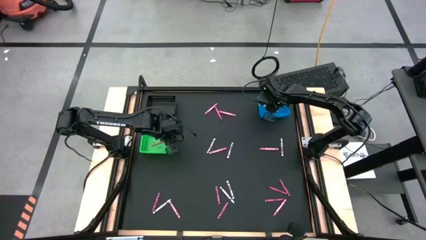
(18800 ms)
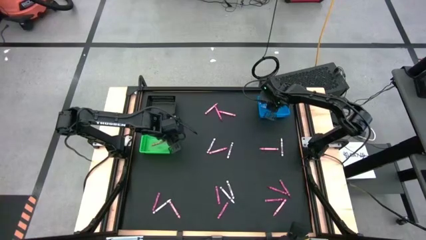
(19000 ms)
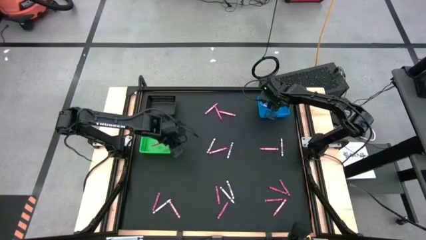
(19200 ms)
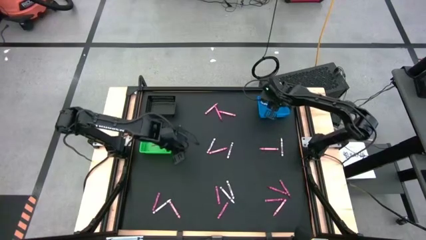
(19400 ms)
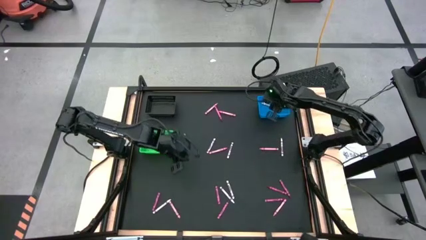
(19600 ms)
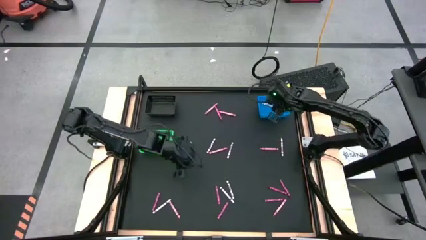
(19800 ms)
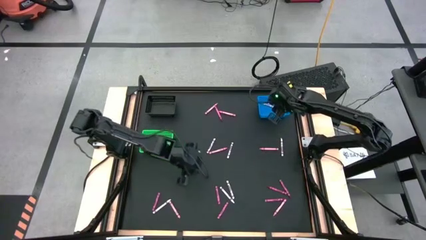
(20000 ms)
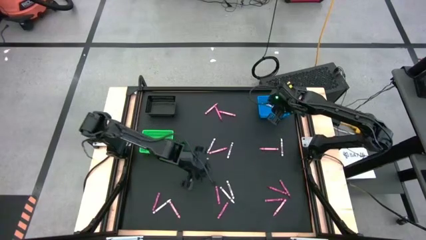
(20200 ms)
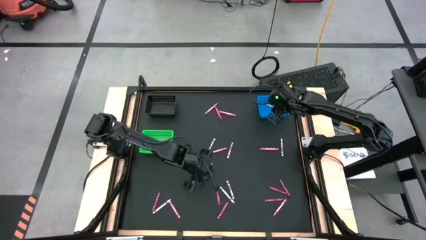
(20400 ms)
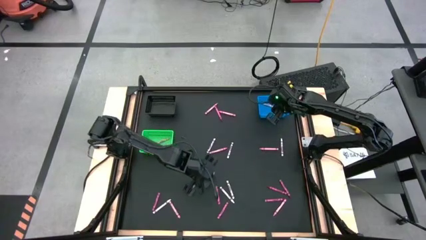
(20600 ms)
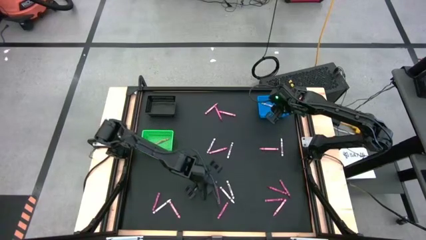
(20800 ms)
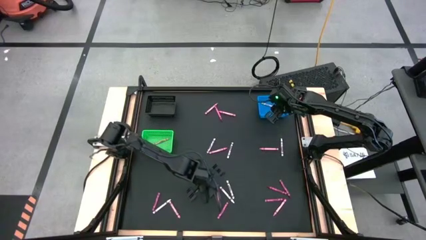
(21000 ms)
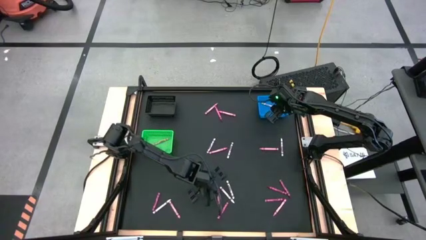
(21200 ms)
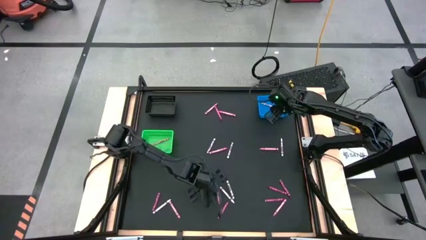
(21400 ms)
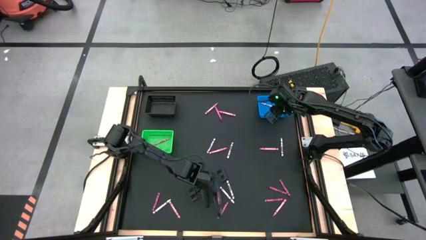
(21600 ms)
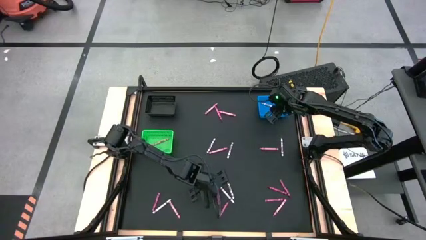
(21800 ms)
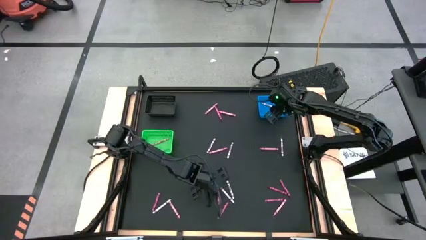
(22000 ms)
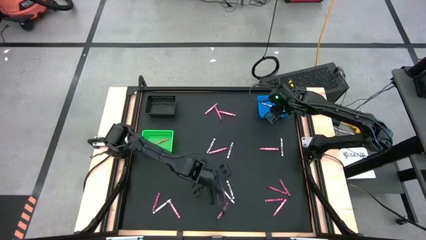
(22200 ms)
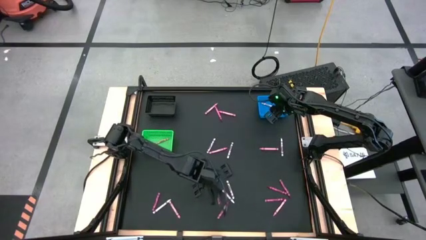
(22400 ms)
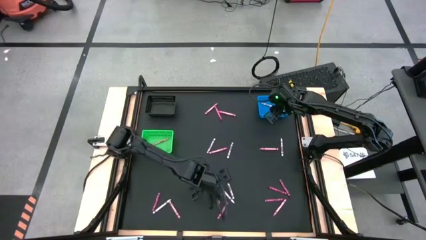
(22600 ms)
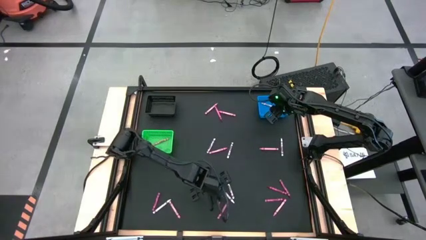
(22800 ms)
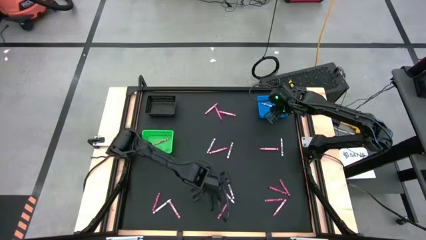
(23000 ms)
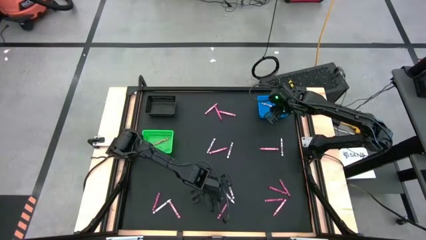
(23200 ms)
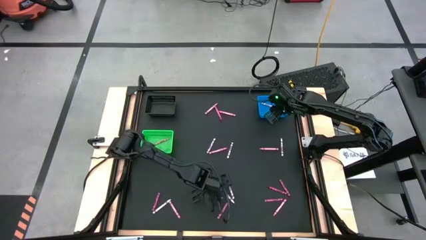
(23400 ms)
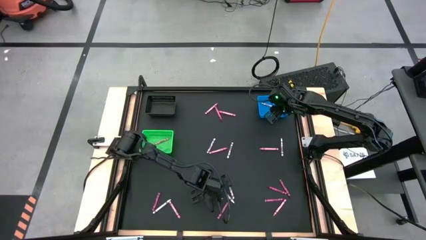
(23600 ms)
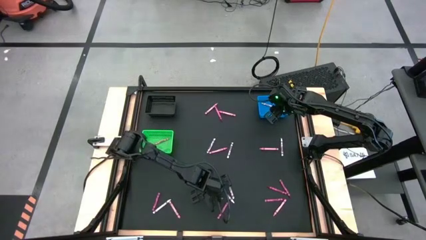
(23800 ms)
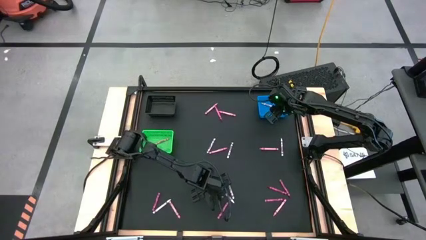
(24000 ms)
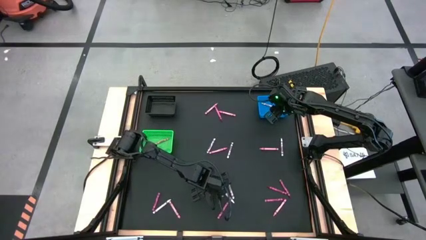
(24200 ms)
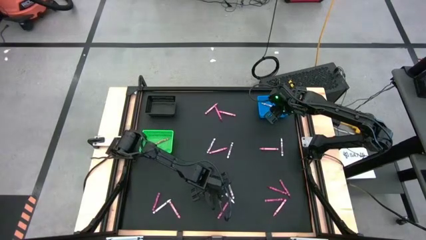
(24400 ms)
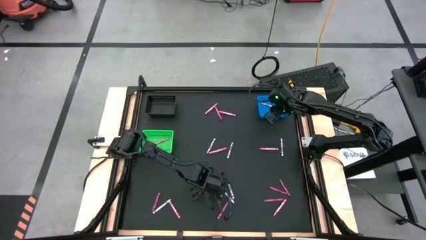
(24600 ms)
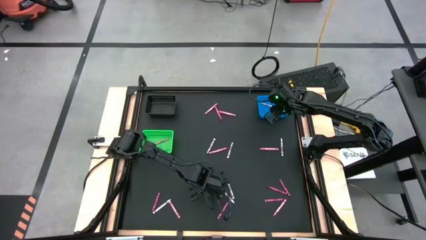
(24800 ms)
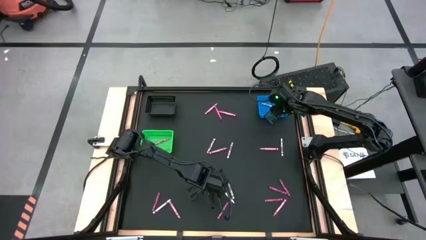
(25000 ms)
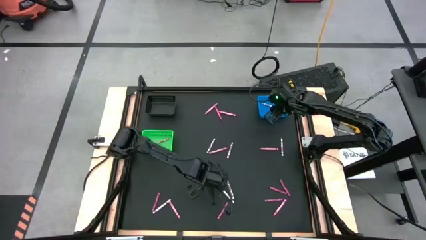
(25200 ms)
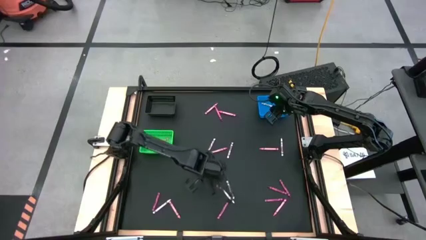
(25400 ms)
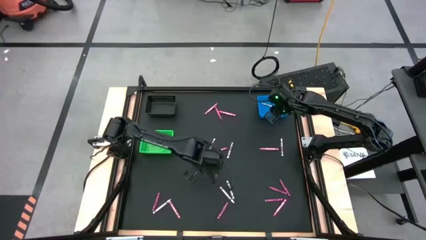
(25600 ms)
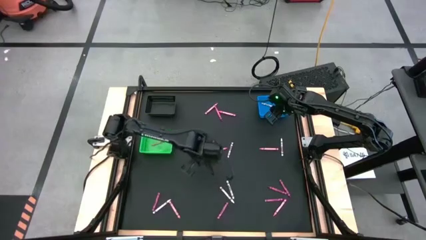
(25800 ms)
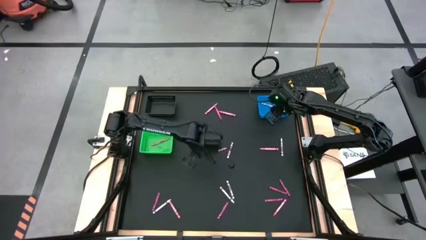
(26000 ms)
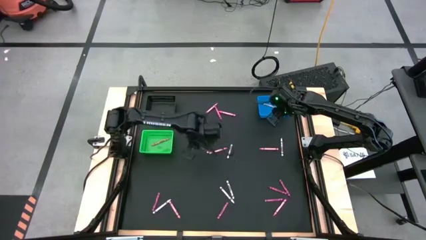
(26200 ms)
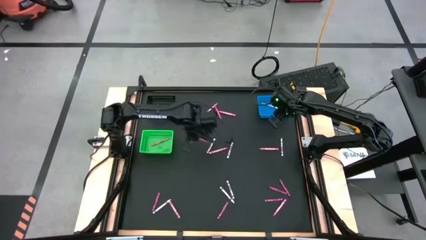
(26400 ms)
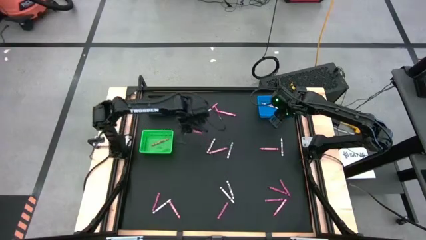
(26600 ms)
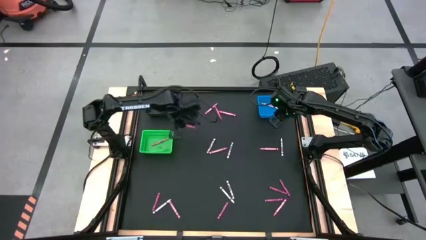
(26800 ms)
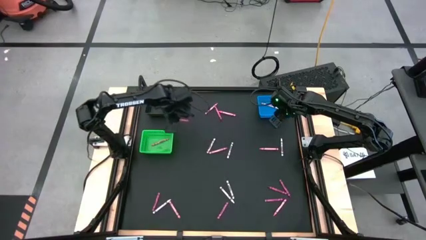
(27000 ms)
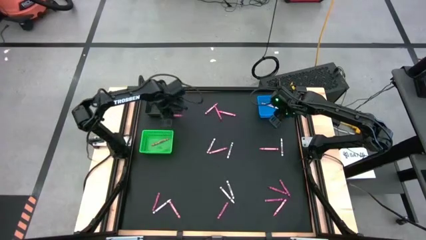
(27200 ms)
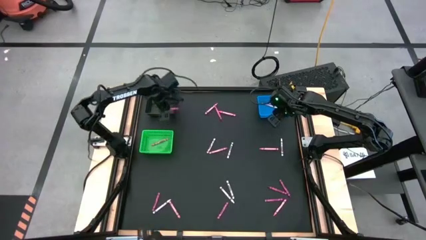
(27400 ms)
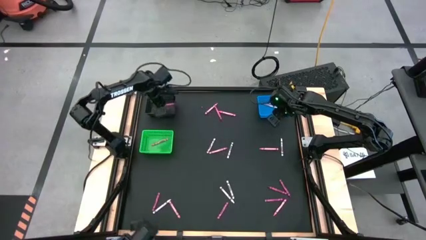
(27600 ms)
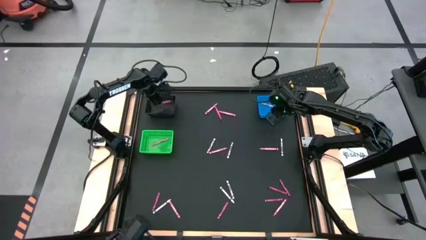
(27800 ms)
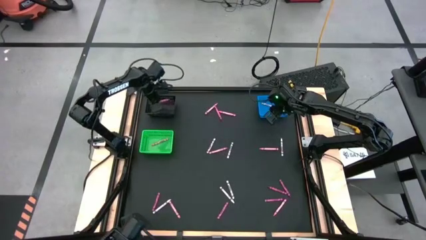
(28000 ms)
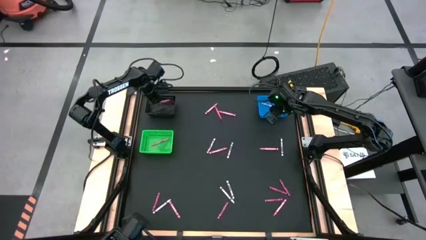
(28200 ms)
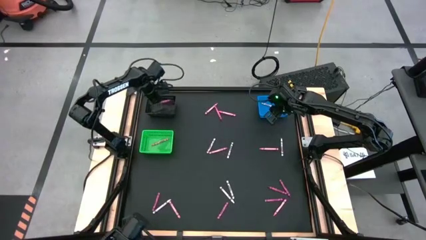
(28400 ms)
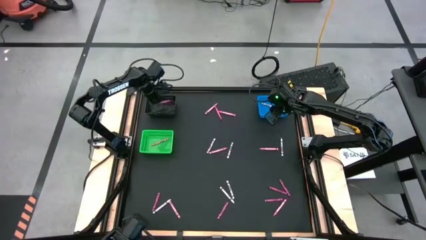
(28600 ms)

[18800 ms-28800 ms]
Task: Sort crayons
Put the red crayon into the back bin

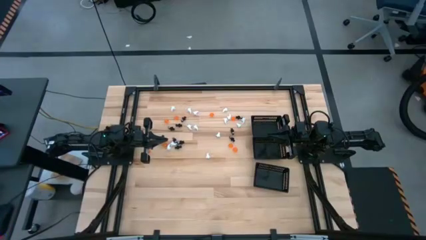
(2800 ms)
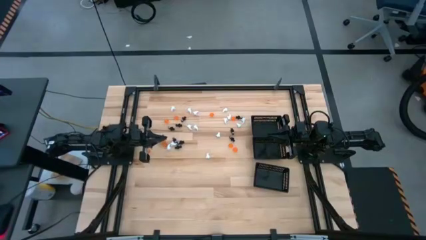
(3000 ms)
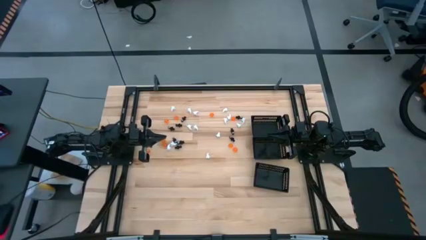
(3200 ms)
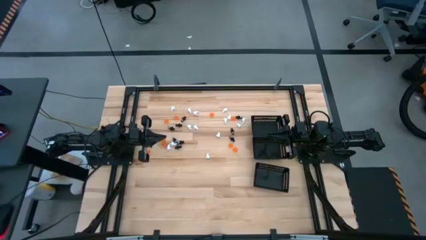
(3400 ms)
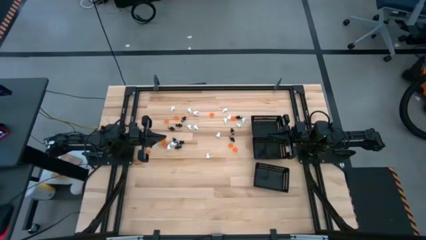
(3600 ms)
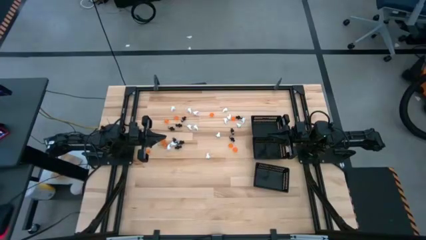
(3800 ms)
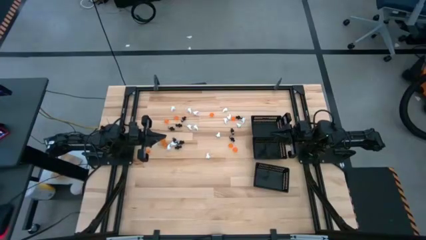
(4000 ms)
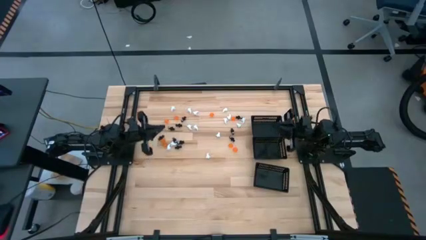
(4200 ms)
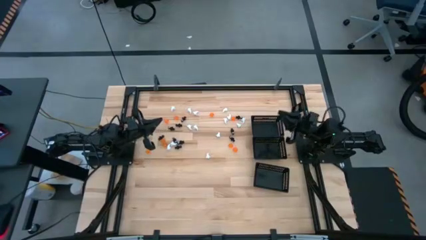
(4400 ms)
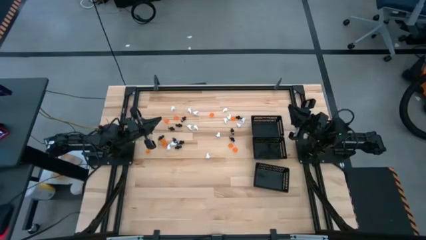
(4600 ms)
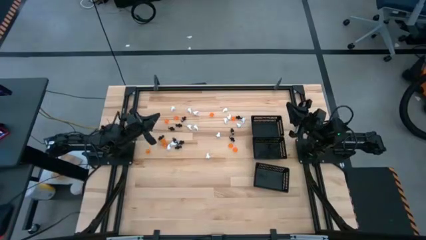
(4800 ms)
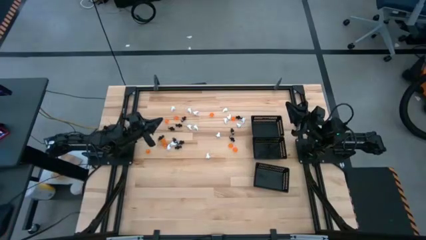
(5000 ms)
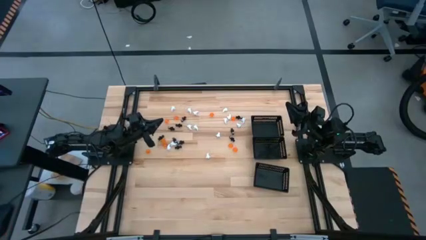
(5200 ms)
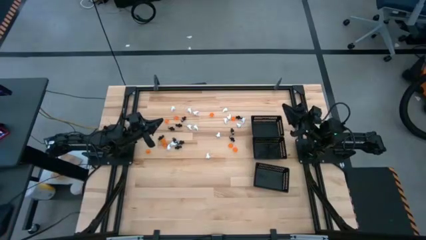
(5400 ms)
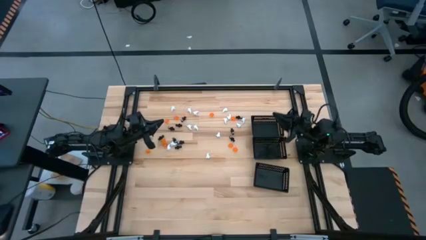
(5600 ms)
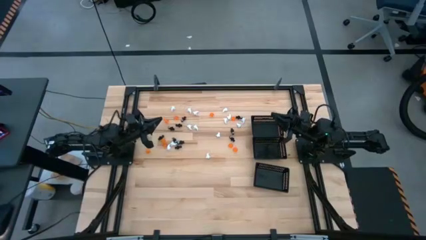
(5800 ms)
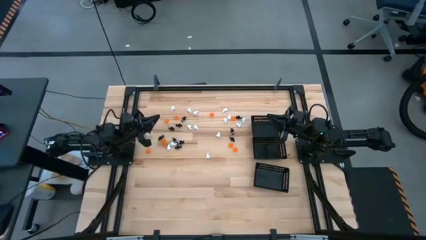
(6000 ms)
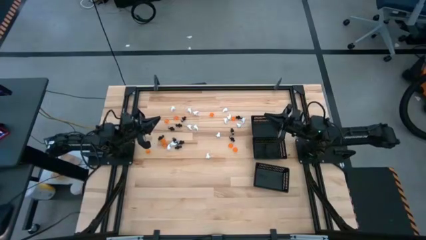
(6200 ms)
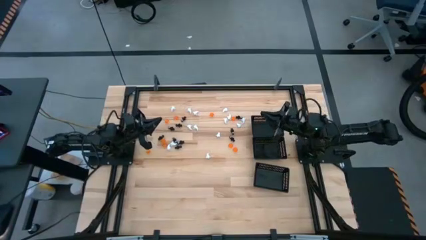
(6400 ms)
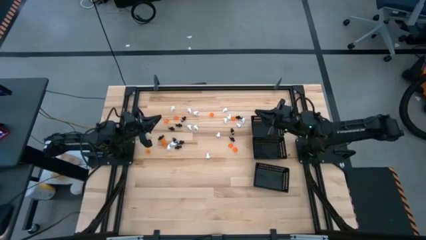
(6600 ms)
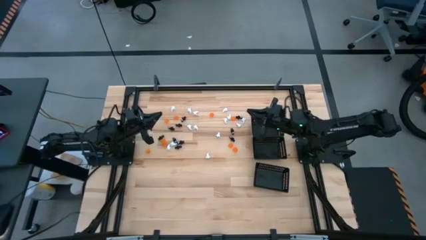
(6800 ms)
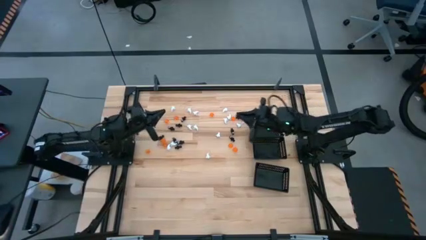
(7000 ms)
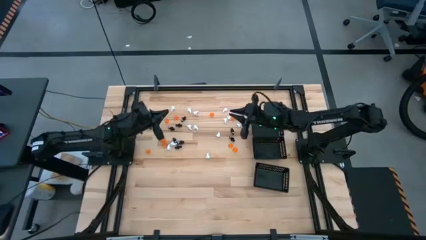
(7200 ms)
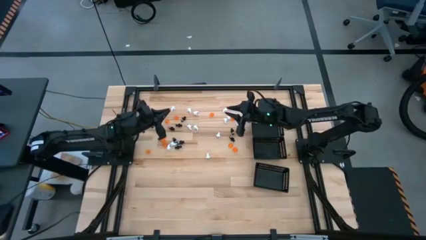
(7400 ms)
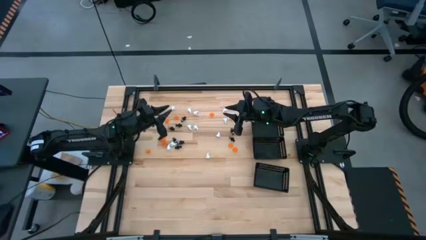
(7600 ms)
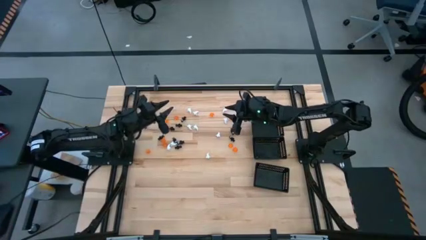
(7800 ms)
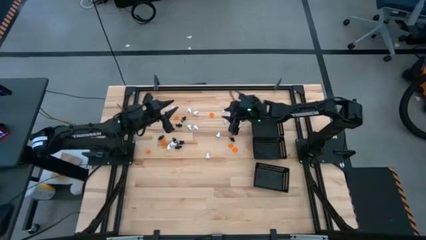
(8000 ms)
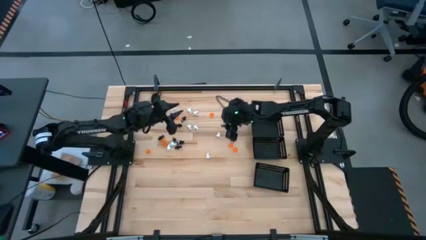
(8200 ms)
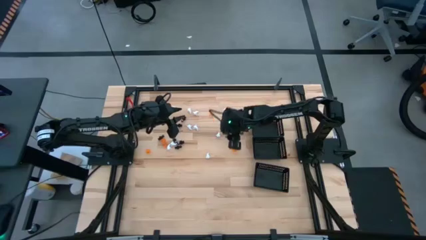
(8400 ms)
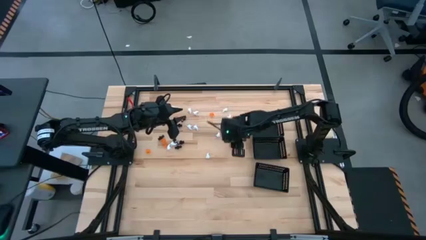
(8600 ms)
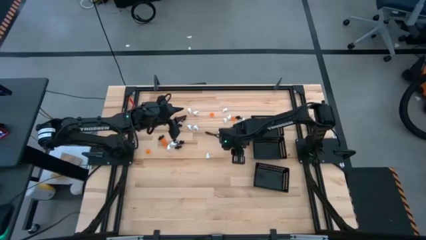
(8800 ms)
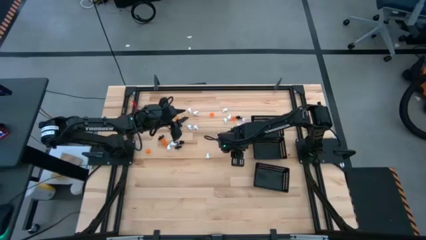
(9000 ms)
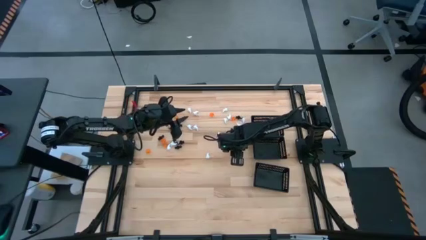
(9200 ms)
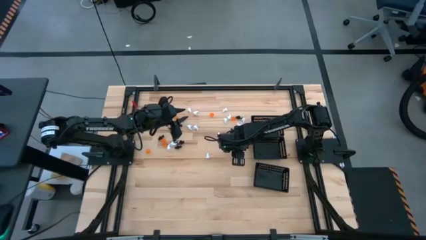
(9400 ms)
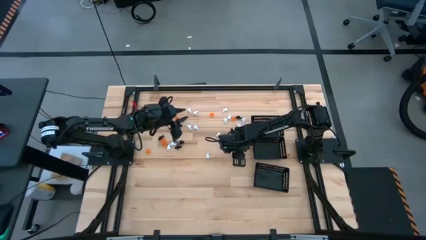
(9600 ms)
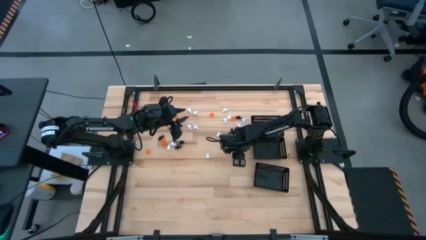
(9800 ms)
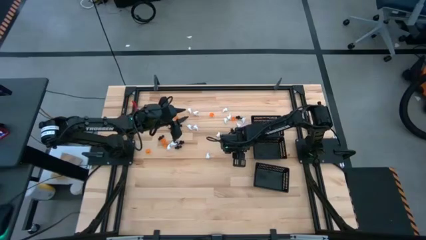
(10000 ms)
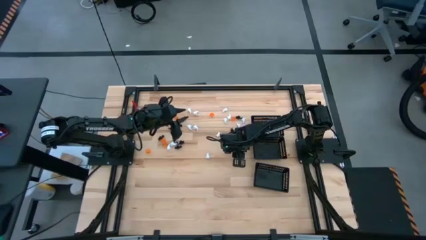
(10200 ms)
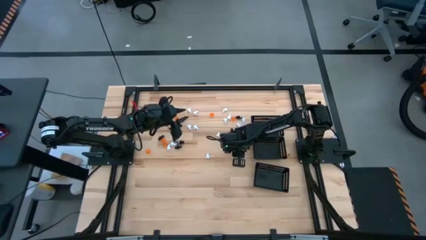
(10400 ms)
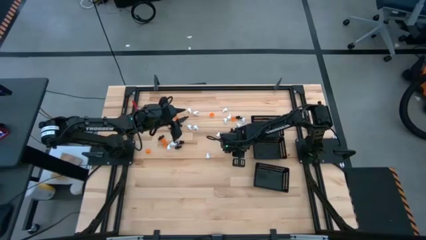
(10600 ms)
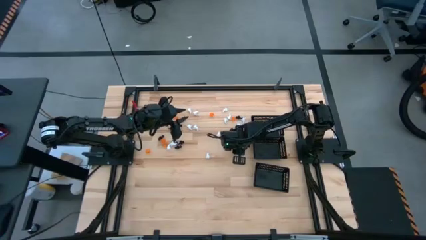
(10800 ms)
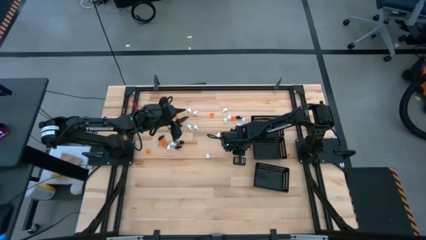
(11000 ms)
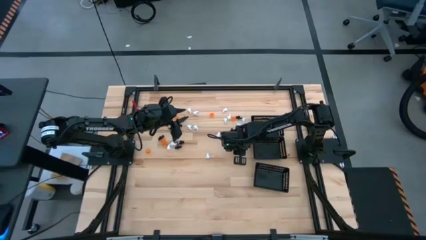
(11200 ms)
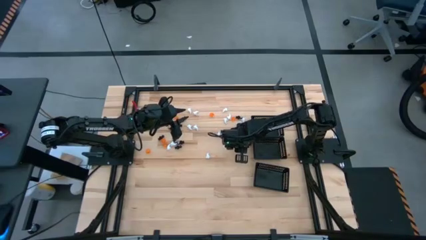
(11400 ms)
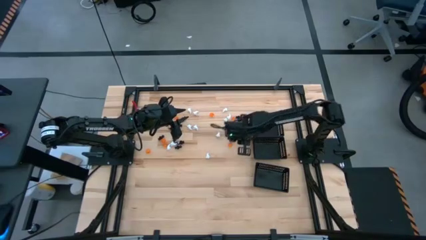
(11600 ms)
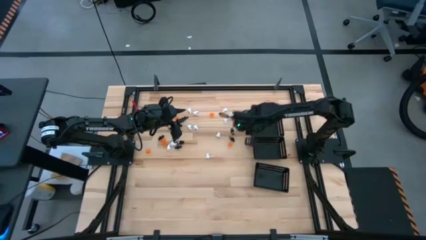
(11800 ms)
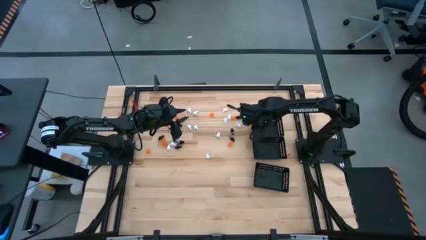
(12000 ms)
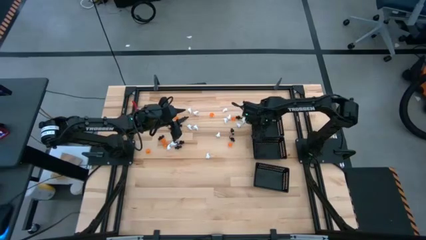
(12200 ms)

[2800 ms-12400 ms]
Task: Sort Halloween decoration
Put the orange pumpkin toy into the top black bin
